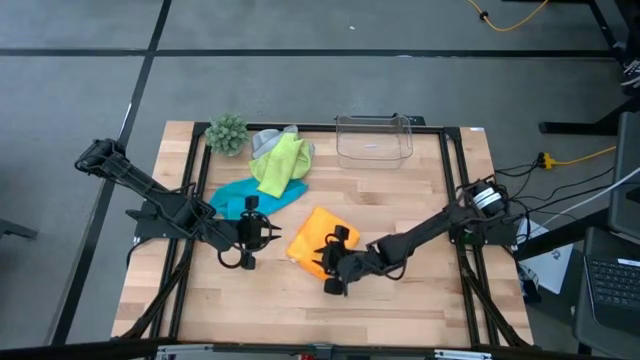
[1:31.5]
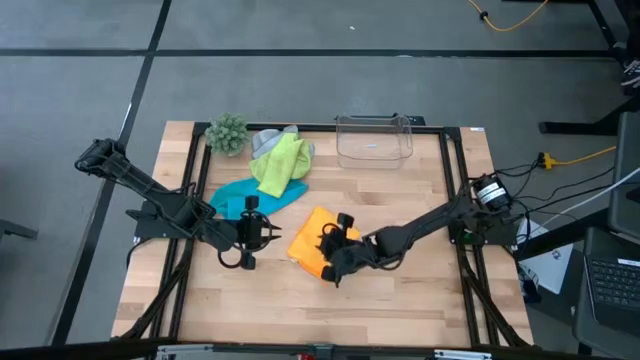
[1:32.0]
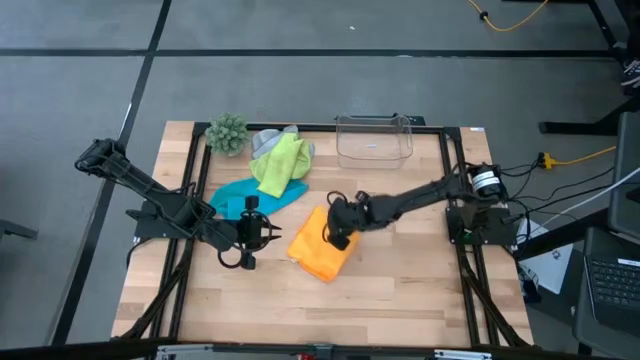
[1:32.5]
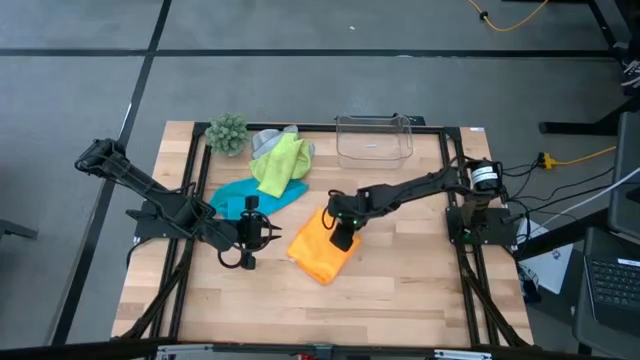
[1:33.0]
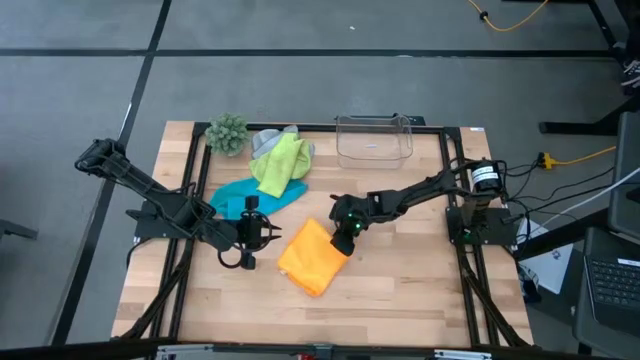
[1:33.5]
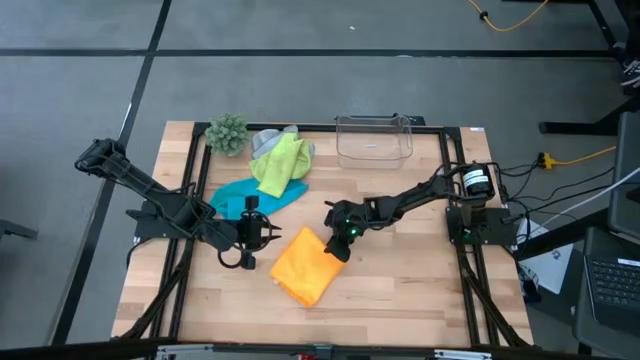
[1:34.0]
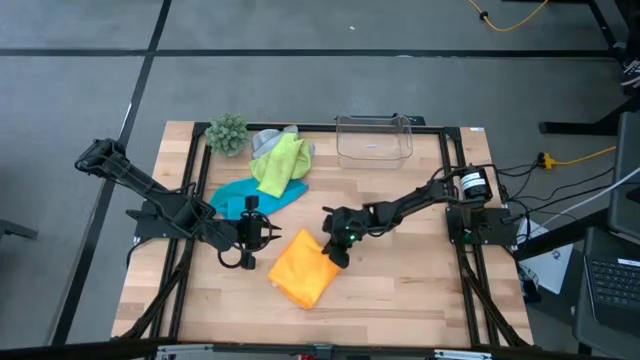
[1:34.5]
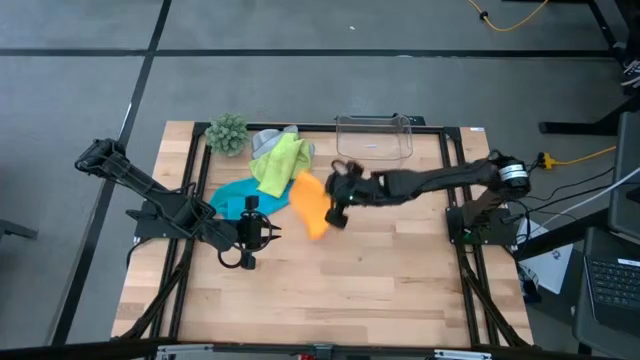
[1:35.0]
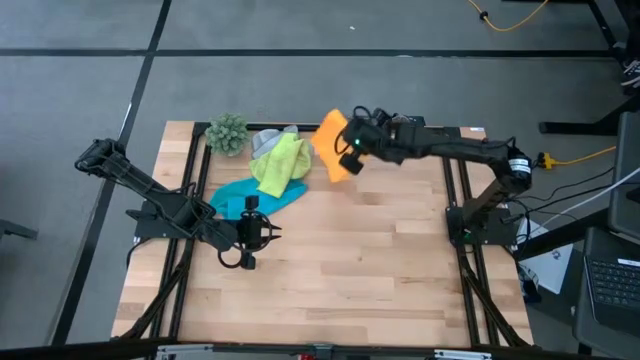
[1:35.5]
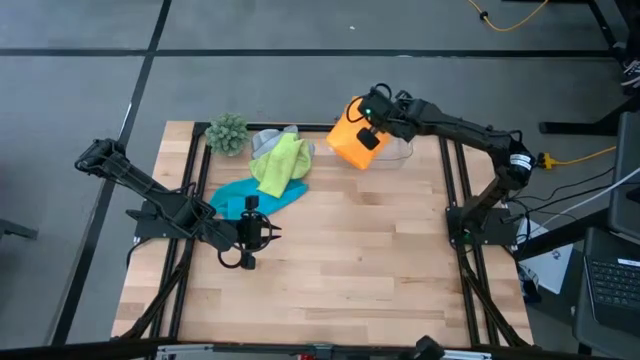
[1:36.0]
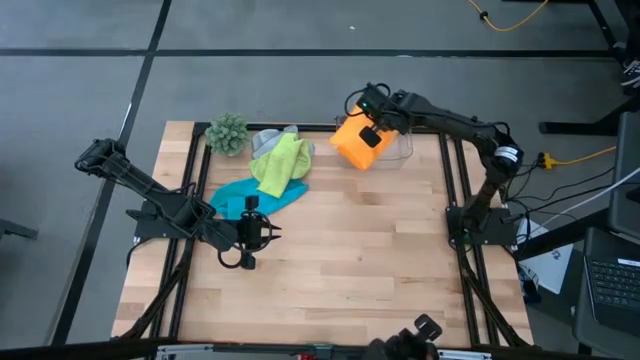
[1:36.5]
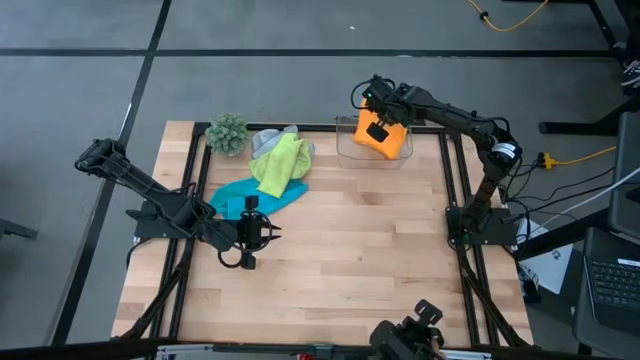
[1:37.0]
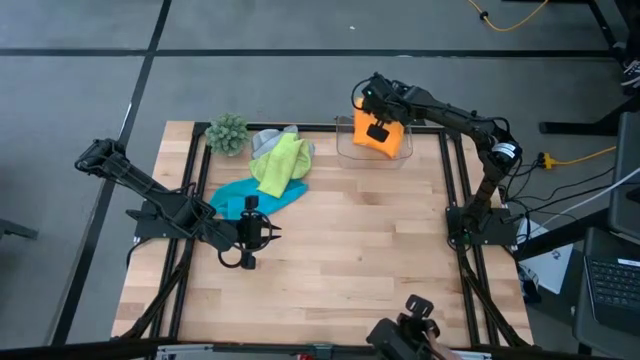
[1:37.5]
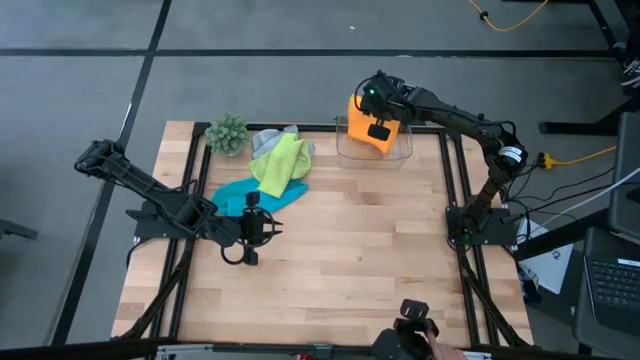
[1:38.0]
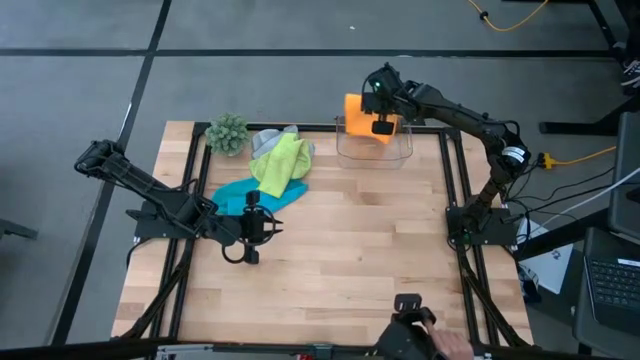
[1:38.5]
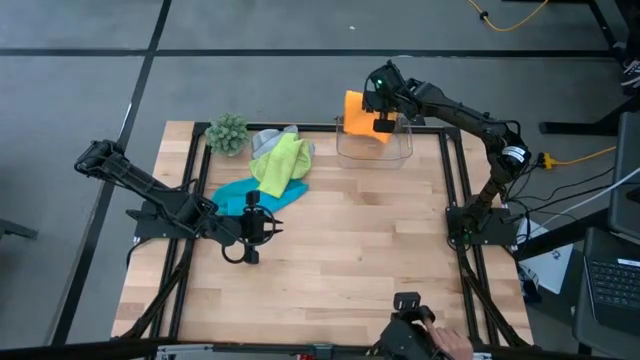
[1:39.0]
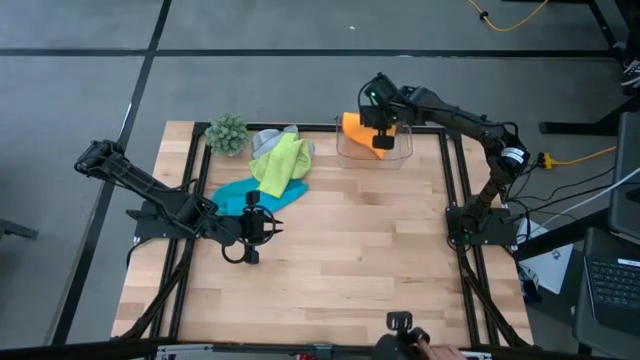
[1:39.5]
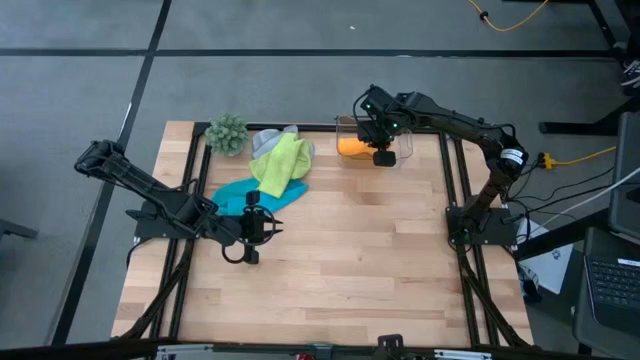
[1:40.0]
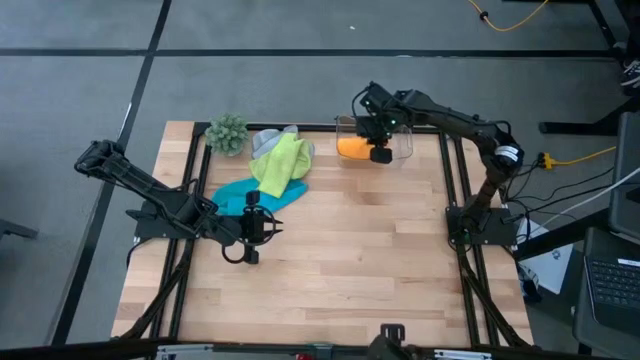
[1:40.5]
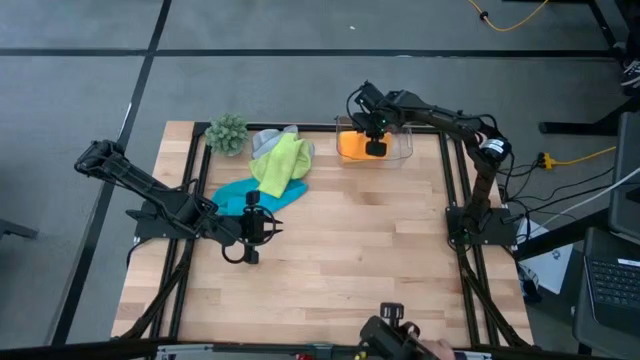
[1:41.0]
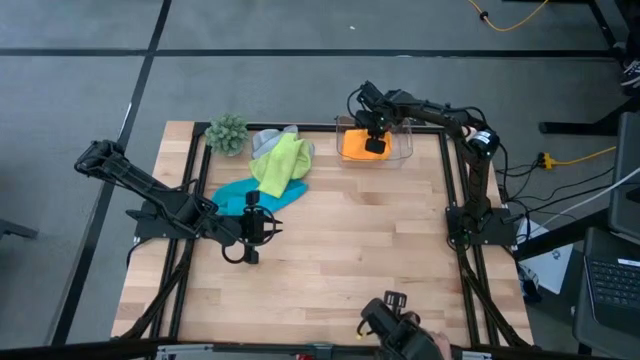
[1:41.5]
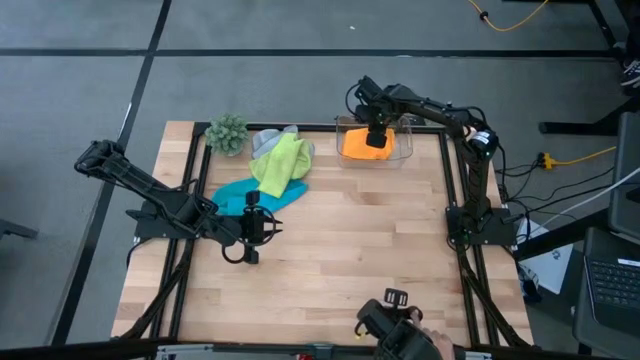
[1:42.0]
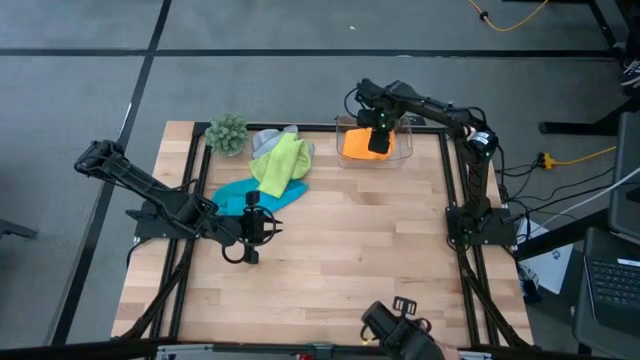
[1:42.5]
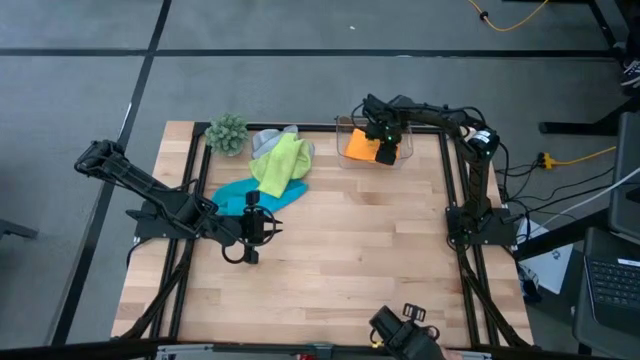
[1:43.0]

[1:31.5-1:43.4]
Task: Fold microfiber towels
Put the orange microfiber cloth into the transparent bin

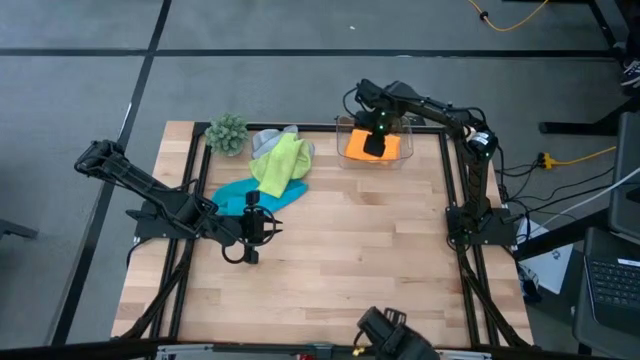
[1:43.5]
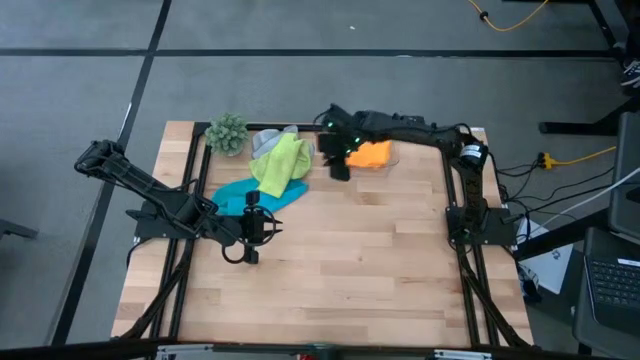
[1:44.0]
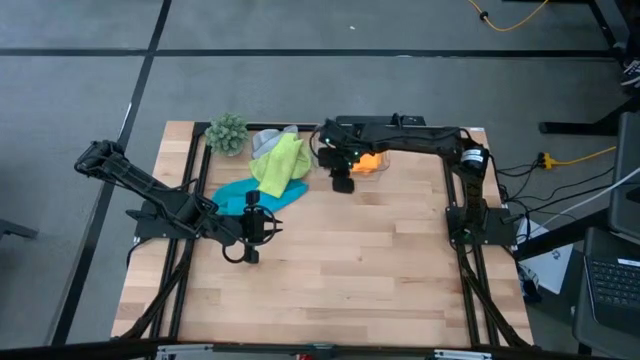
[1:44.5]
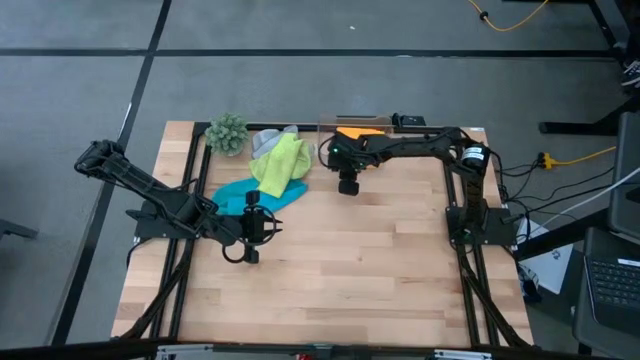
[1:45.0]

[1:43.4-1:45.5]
Adjust the transparent bin

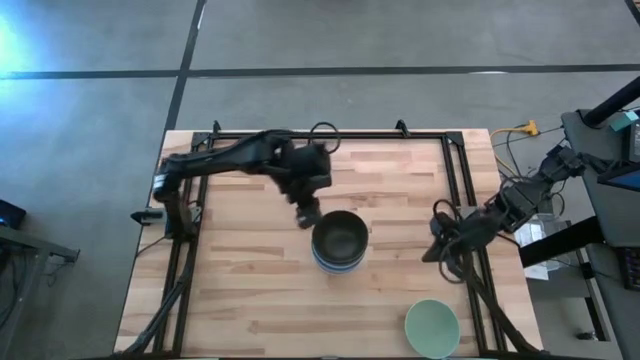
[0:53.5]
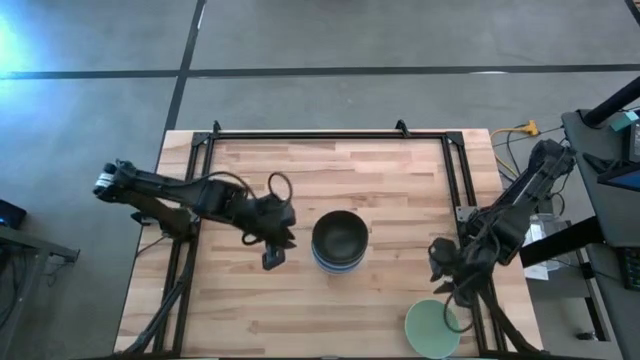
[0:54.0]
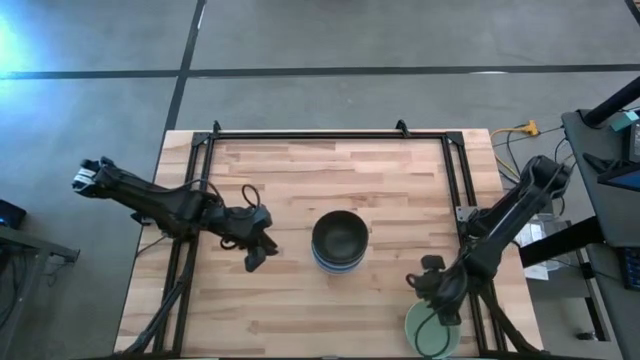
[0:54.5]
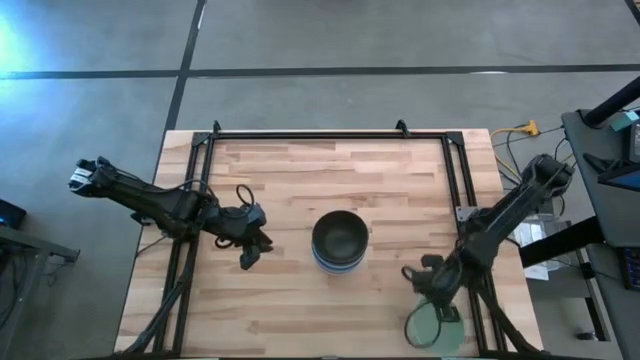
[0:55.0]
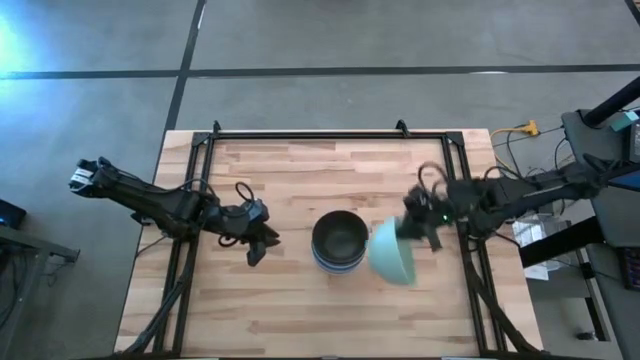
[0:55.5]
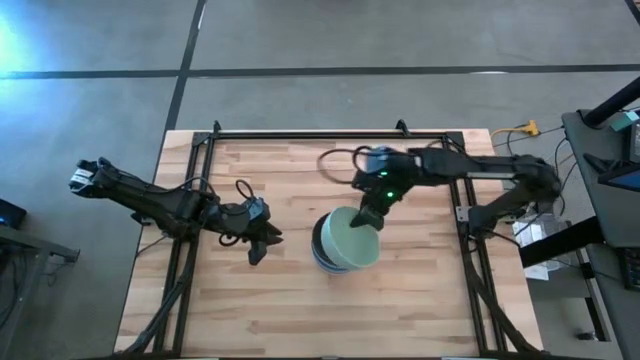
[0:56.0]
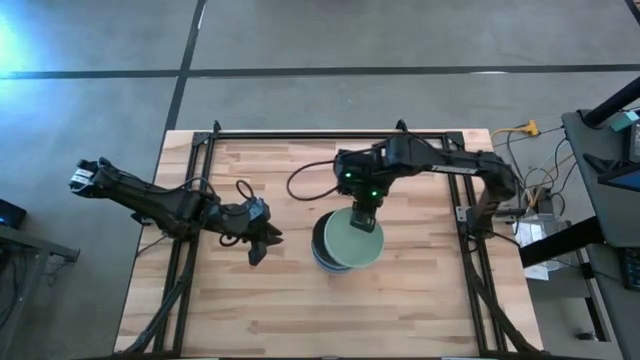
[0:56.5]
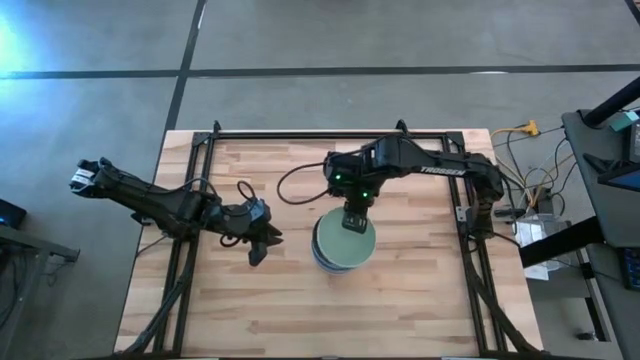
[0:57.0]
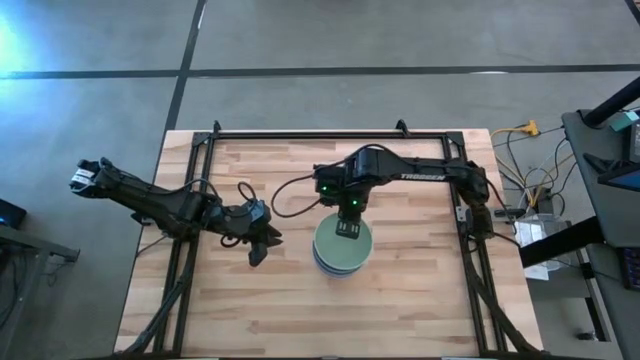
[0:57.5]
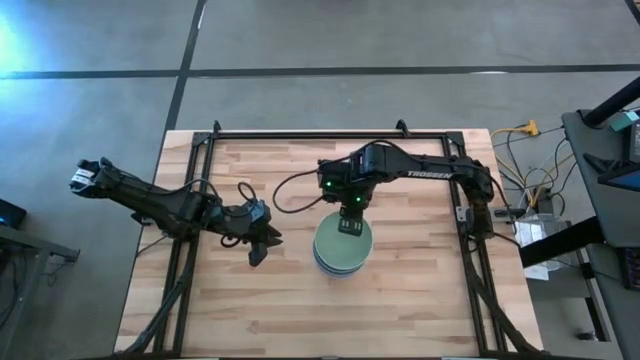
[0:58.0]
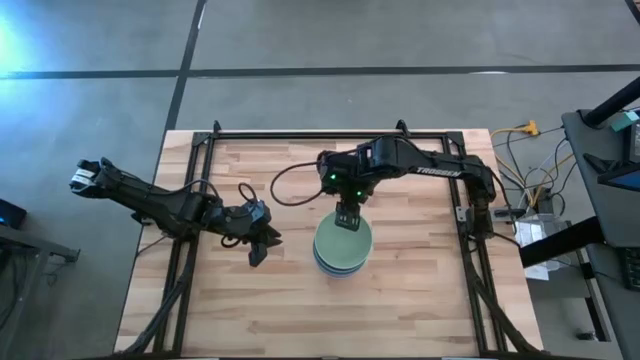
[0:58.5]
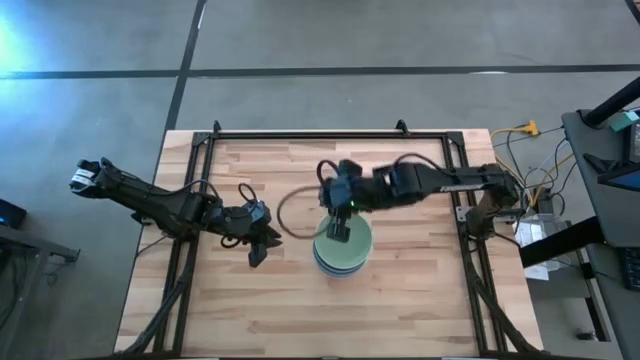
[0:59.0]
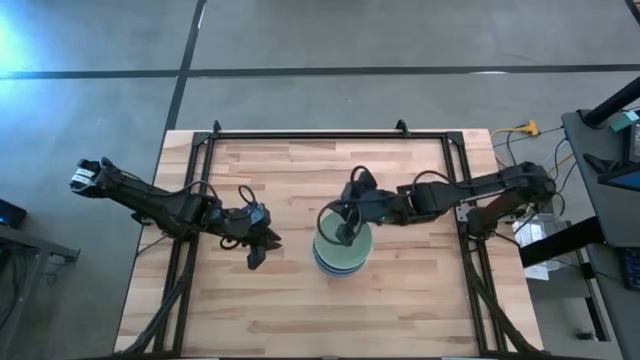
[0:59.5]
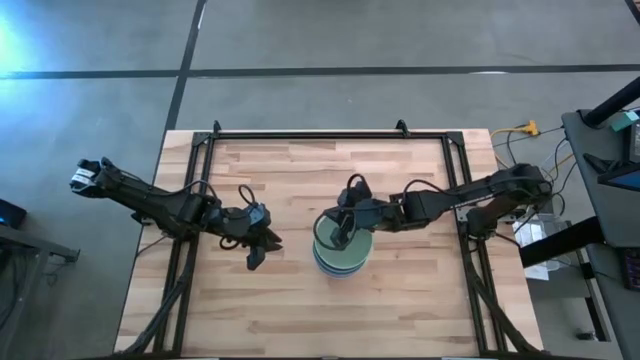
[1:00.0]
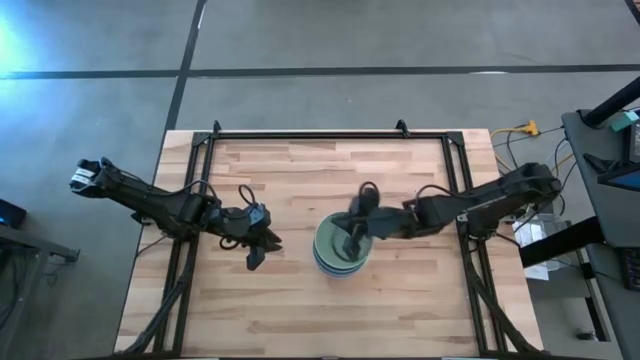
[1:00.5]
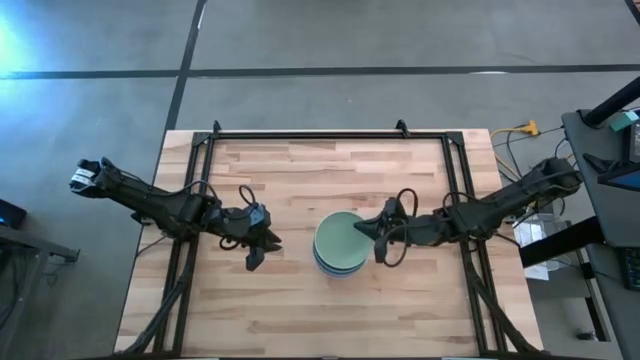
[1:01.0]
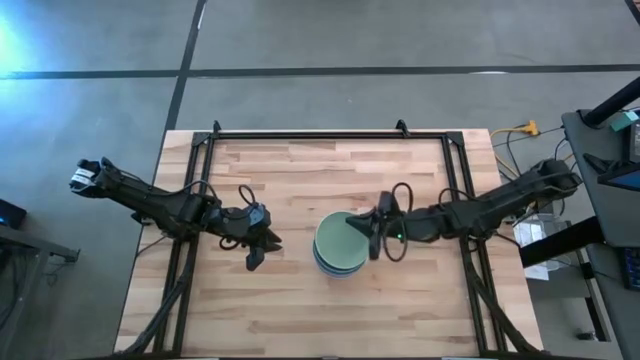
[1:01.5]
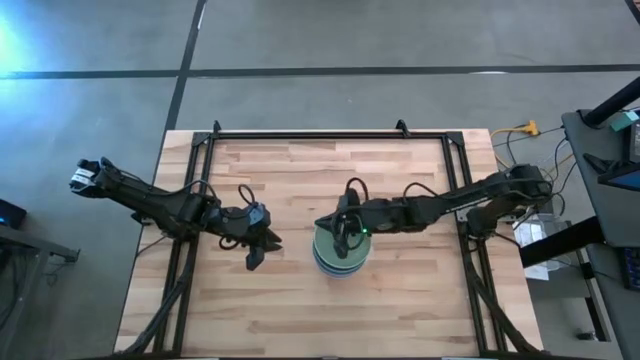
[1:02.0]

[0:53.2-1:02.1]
Task: Nest bowls inside each other
Stack the green bowl on top of the black bowl
